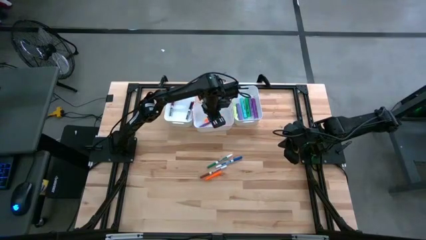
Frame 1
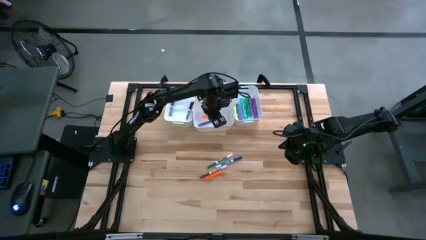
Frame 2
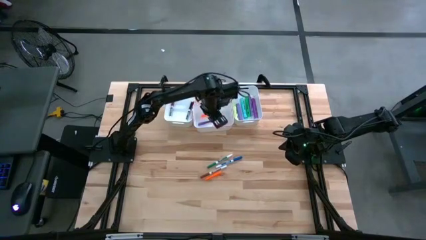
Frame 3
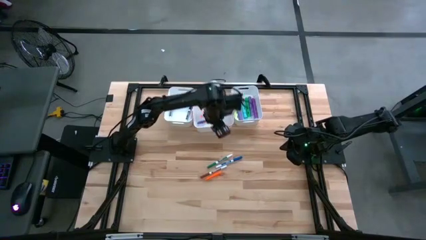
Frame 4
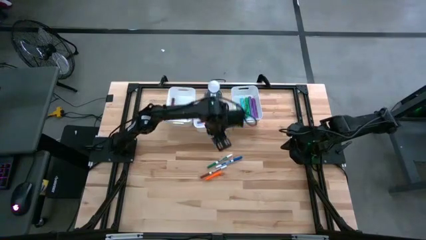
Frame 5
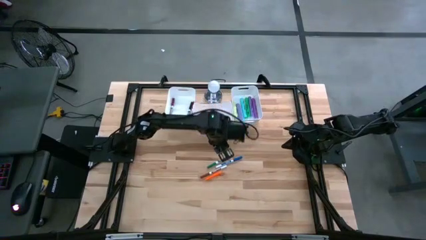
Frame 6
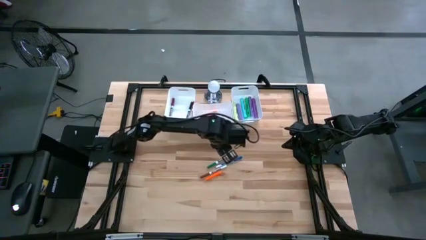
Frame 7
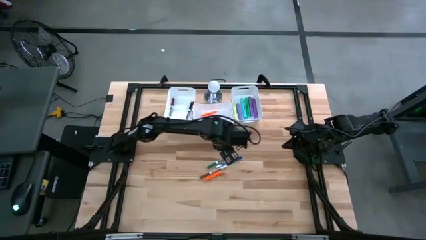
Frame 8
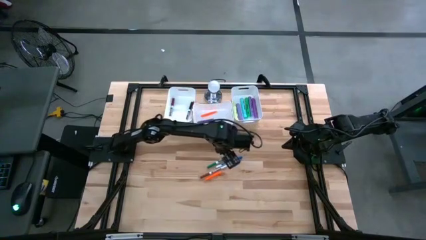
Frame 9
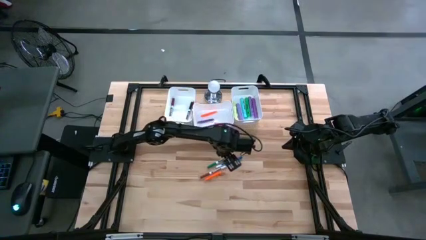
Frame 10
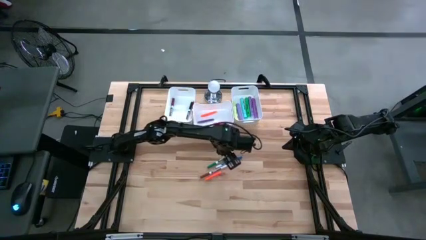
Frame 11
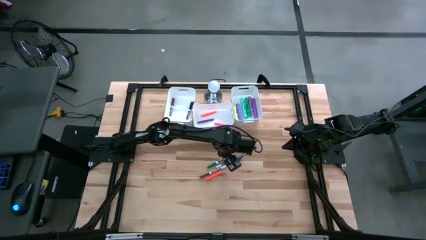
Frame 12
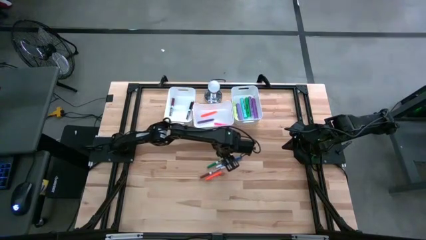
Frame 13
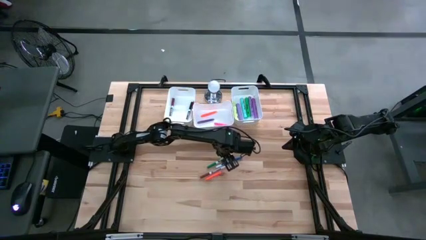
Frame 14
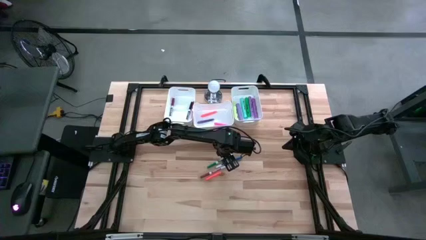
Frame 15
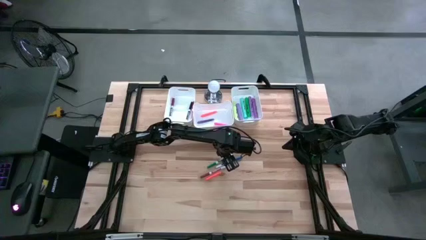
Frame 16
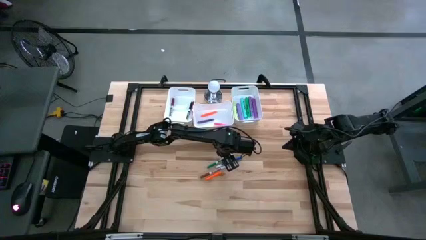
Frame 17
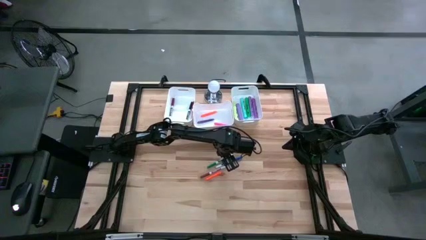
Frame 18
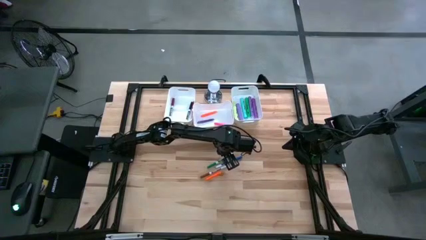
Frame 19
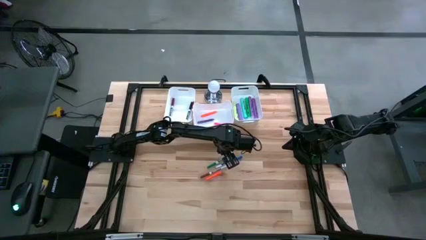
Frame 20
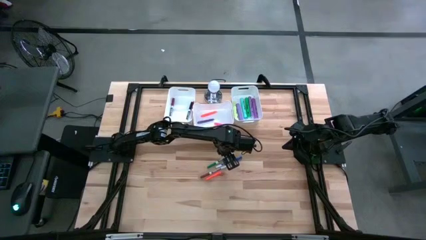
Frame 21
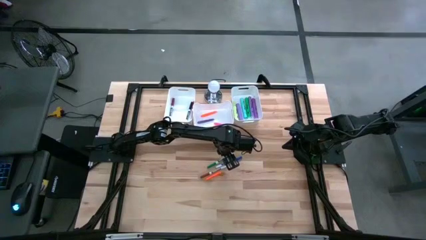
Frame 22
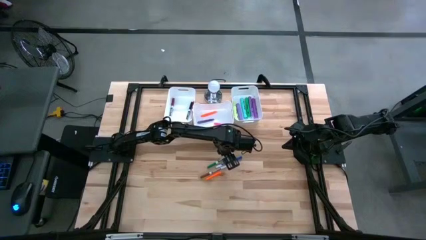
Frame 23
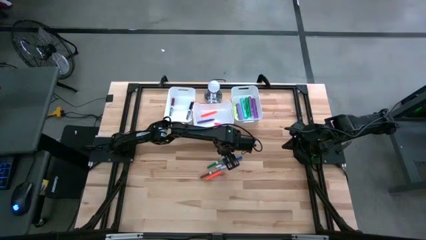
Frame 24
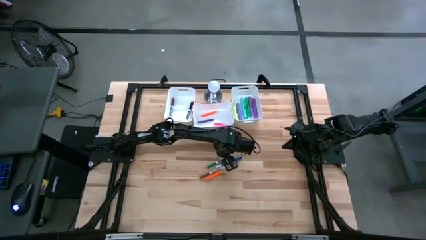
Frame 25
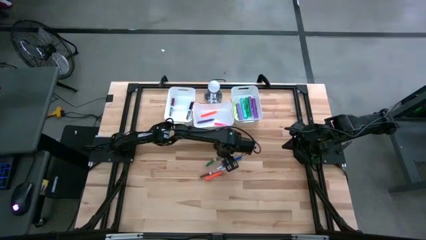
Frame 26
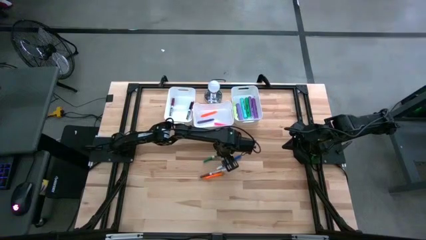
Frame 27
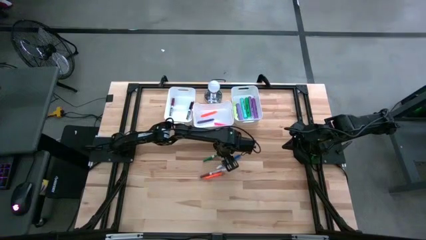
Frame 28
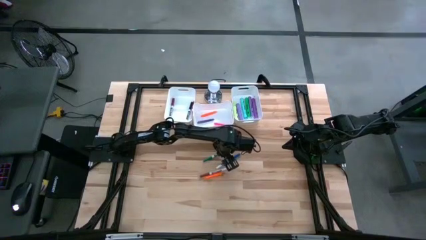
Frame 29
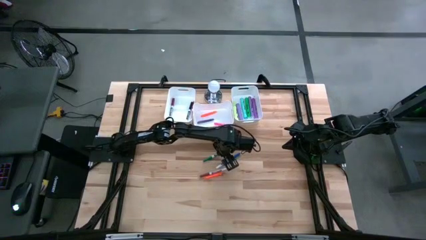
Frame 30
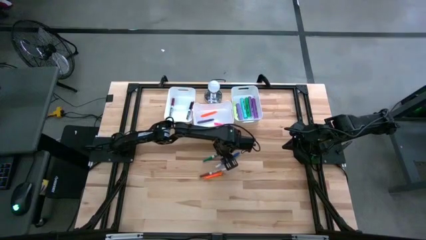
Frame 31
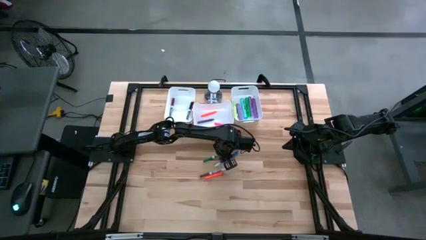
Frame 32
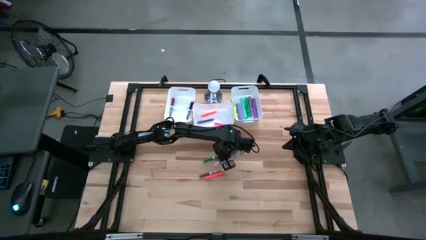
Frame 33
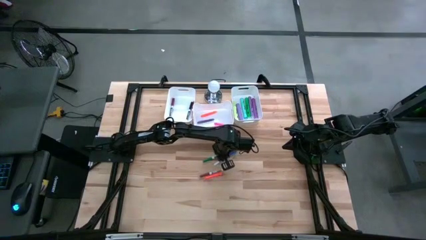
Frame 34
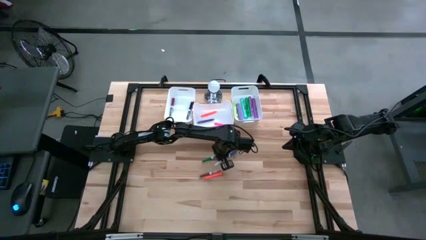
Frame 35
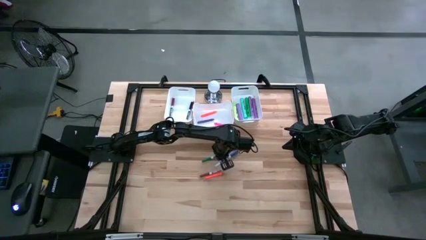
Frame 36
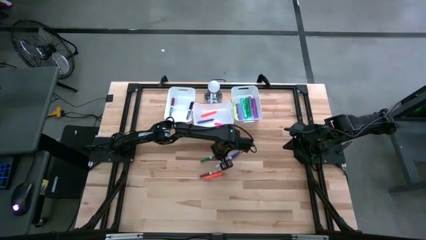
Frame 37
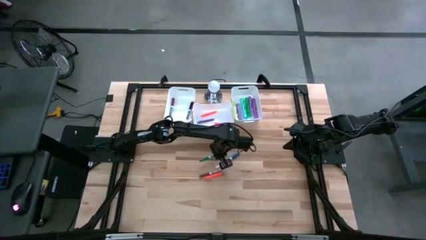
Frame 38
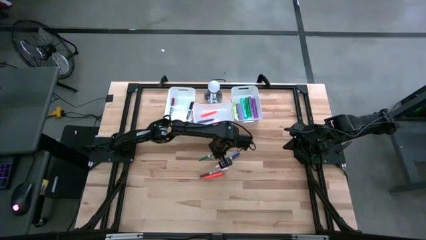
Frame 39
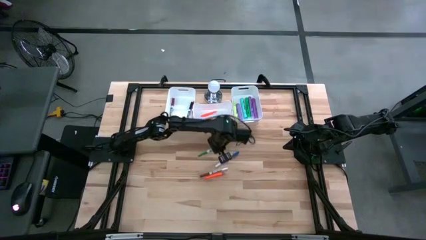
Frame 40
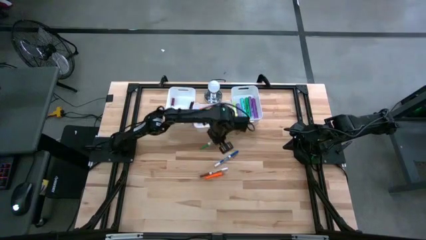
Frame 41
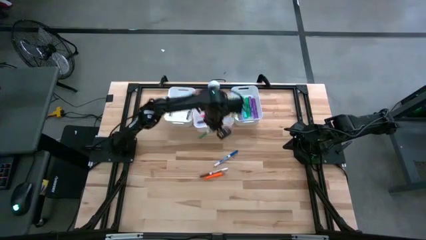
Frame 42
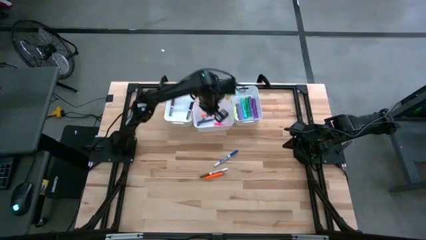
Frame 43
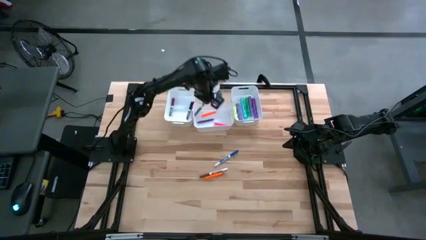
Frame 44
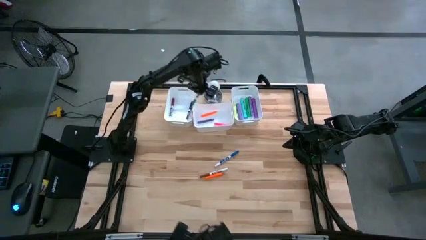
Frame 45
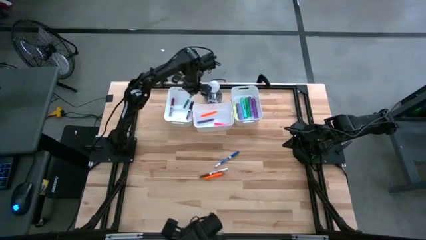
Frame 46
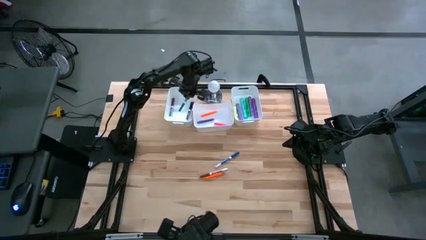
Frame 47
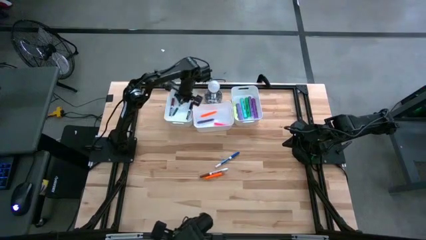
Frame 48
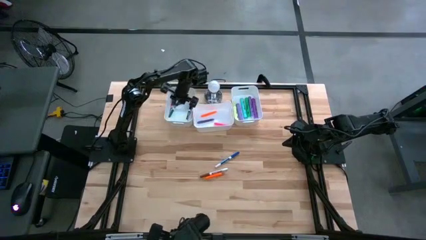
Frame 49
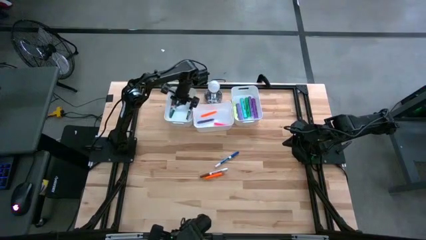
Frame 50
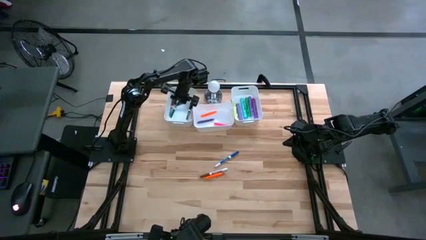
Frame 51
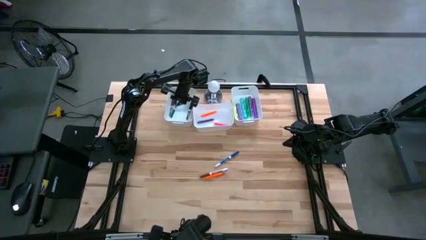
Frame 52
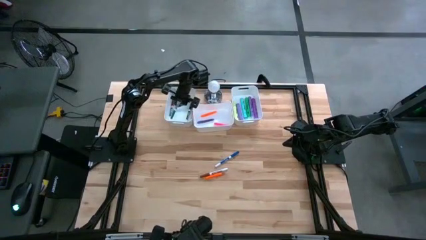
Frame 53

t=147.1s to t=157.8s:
Task: Pick & Place Markers
Put the green marker pen into the left white bin

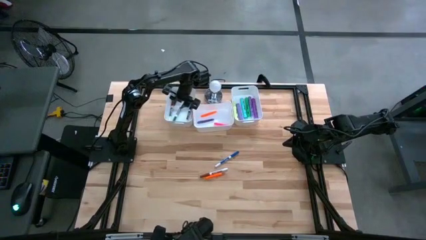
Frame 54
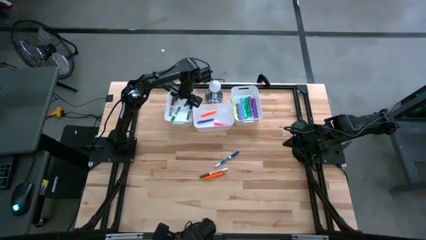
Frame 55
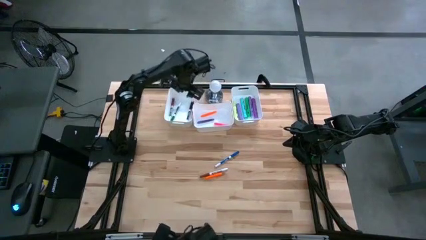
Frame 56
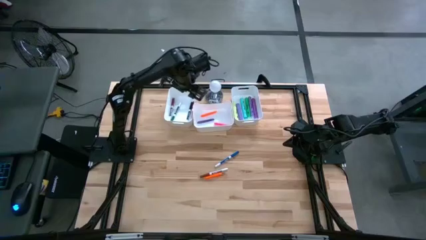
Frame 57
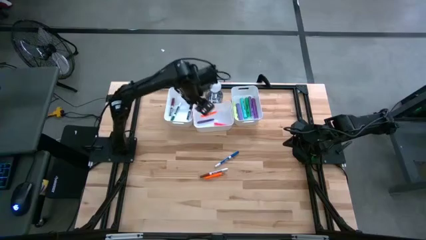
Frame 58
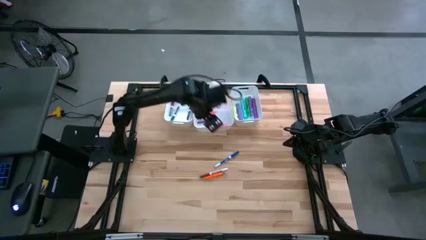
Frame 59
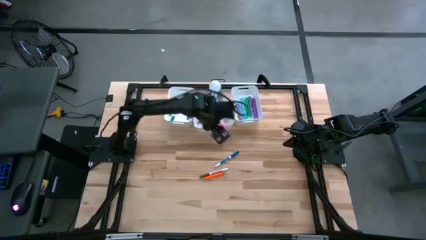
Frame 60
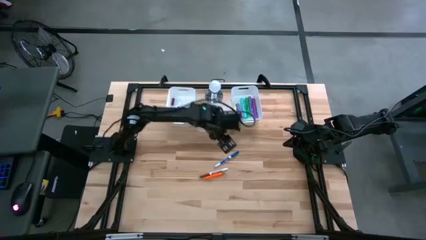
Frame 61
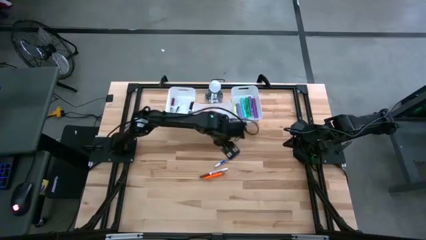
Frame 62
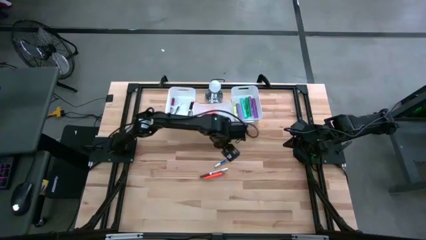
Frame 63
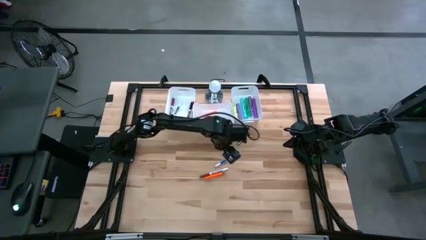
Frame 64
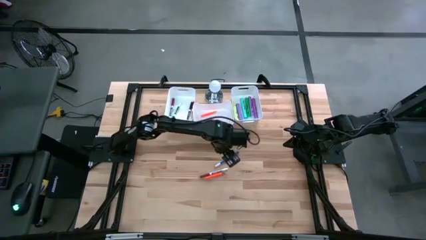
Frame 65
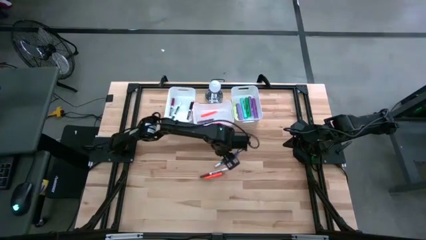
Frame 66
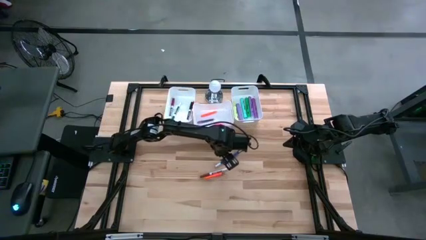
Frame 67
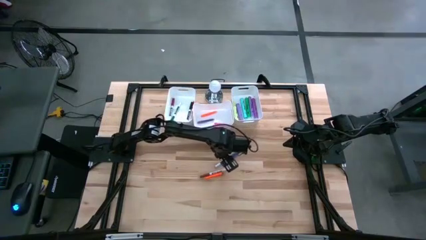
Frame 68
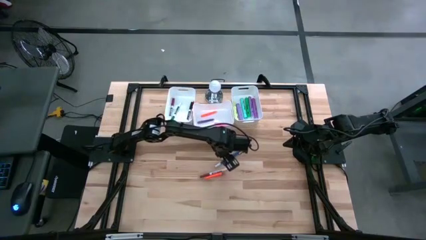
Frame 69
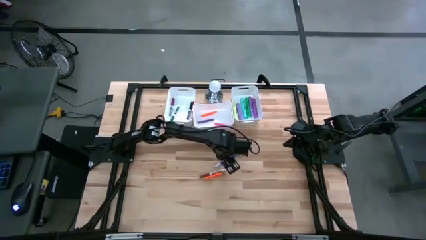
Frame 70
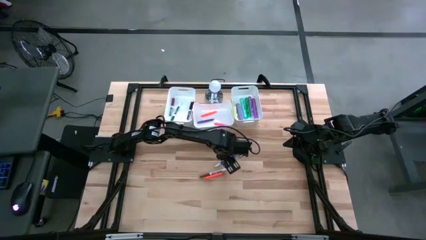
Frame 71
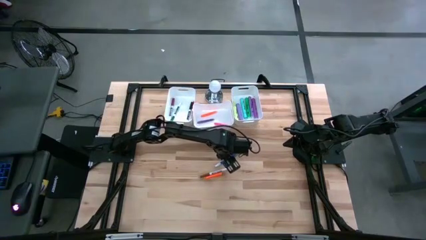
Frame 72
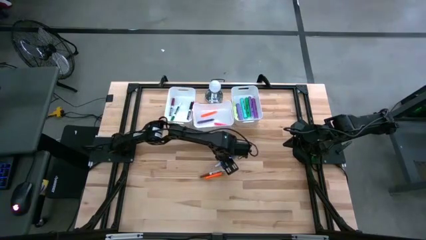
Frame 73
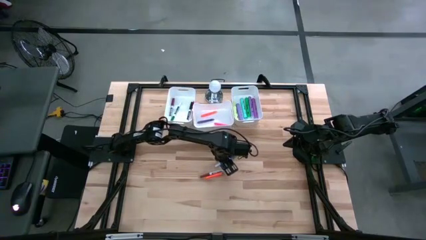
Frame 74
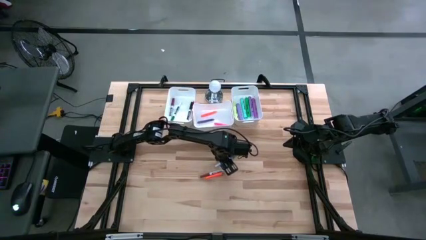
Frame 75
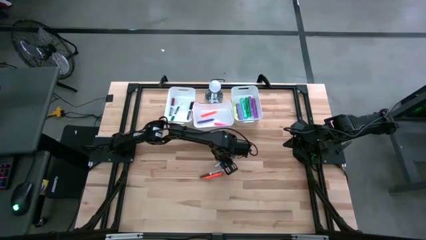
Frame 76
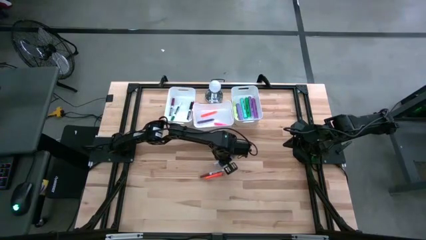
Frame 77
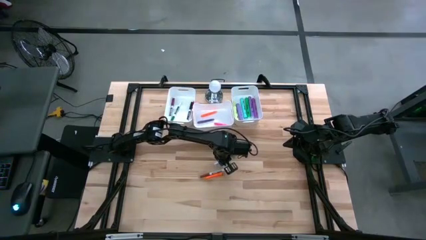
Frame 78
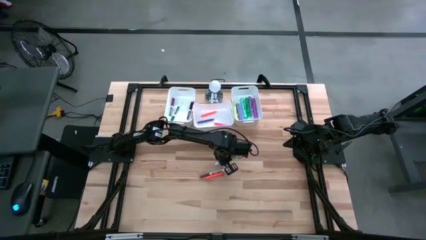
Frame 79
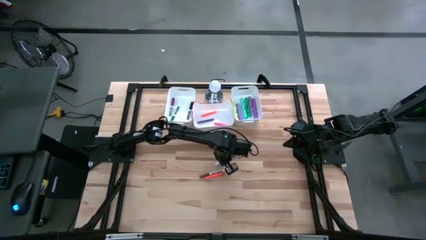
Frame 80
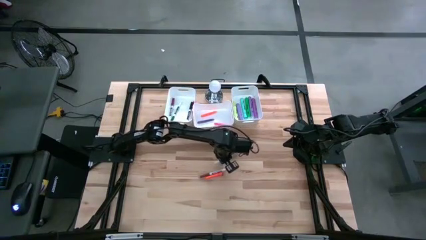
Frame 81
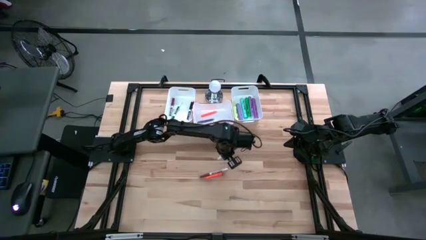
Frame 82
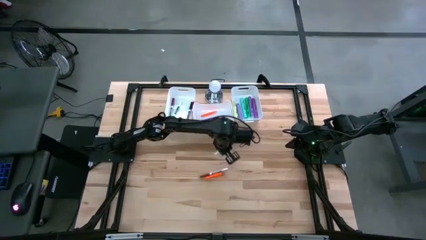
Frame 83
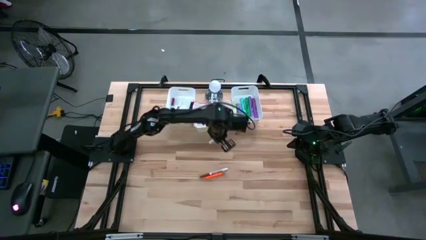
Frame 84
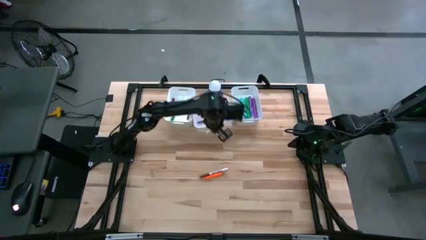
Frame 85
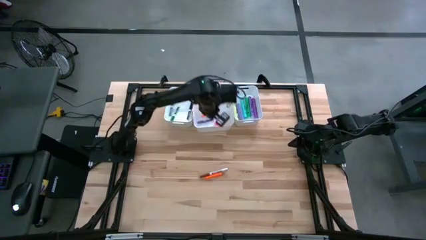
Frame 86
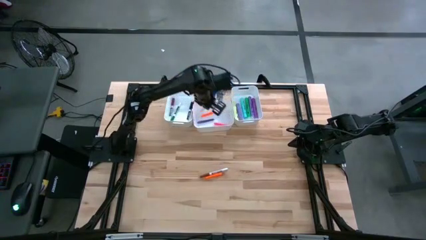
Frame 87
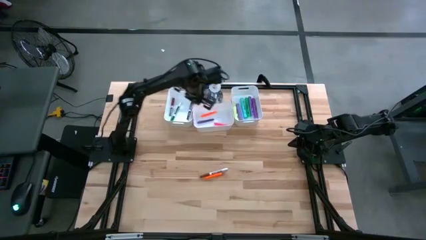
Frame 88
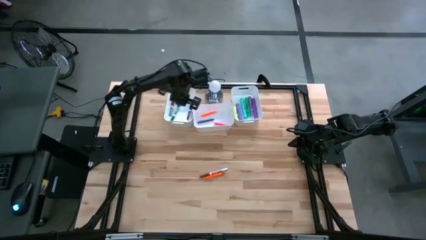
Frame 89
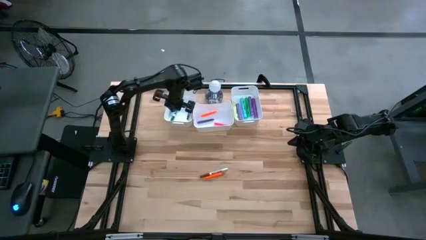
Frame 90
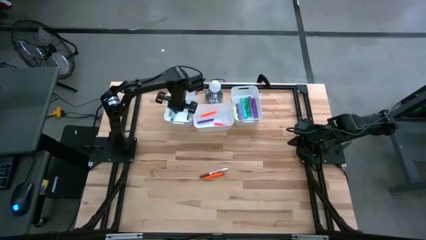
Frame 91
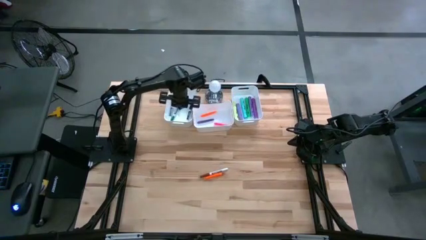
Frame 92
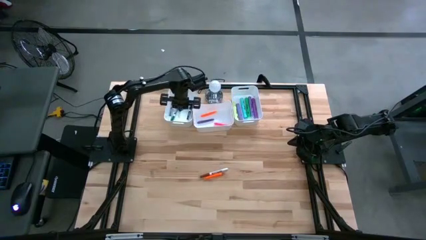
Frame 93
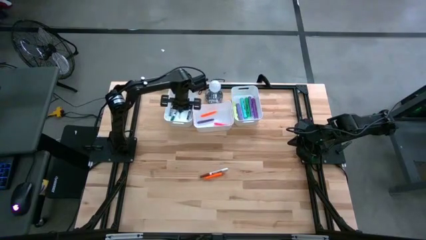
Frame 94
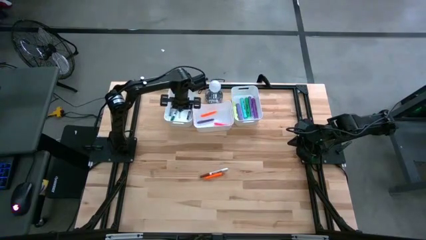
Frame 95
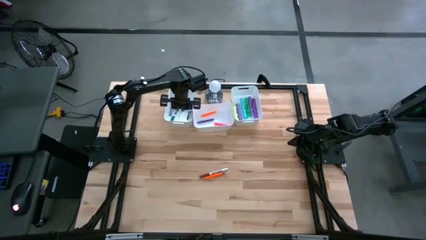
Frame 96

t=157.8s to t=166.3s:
Put the blue marker pen into the left white bin
